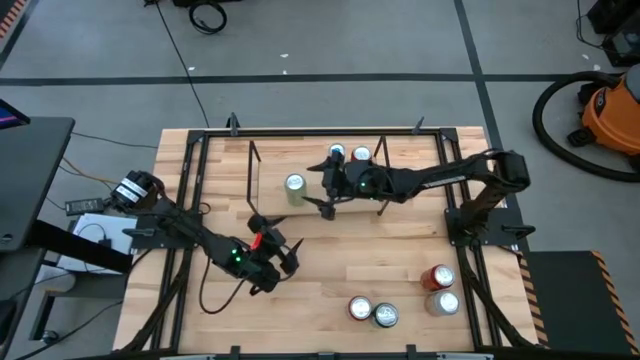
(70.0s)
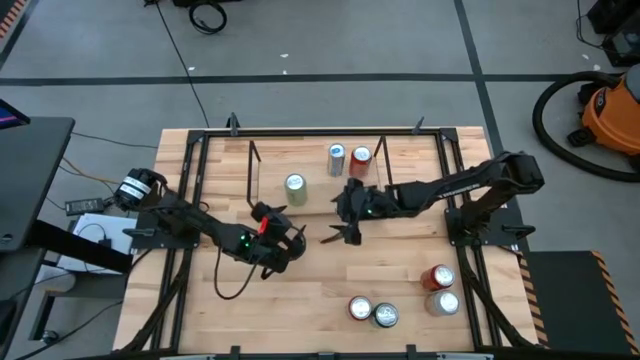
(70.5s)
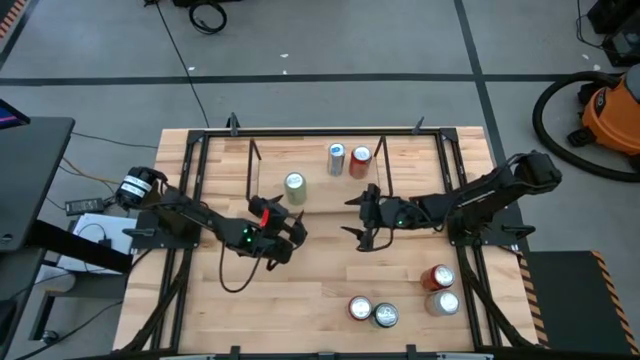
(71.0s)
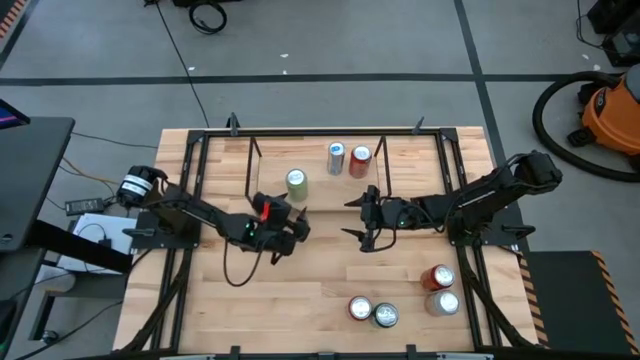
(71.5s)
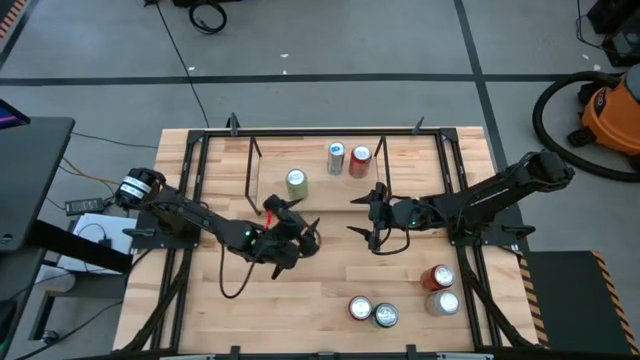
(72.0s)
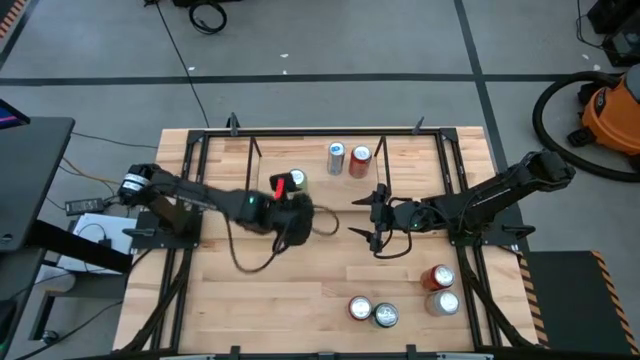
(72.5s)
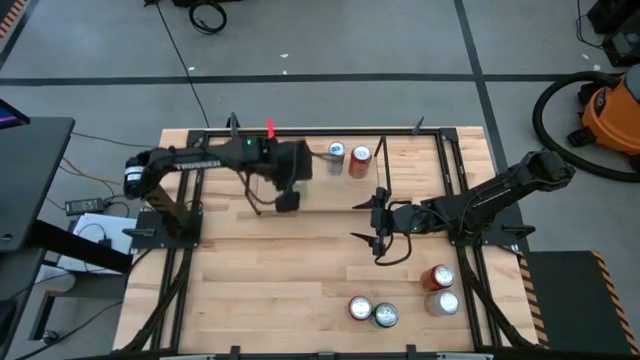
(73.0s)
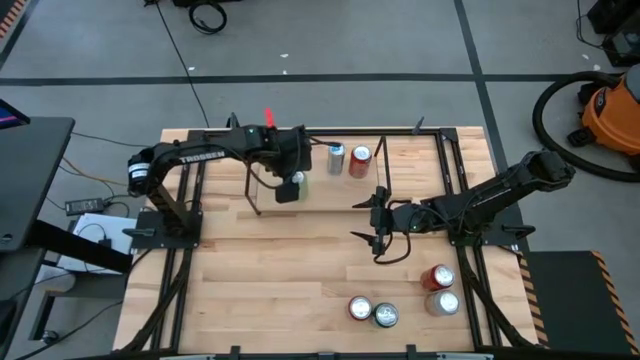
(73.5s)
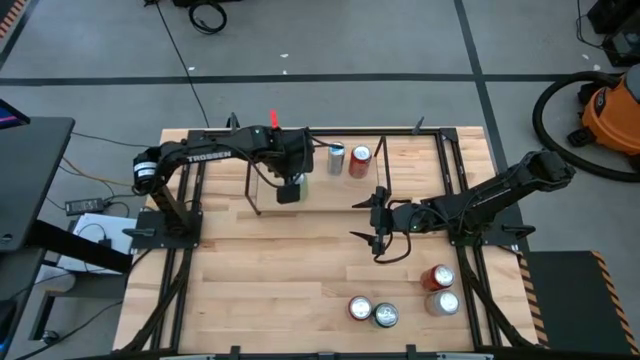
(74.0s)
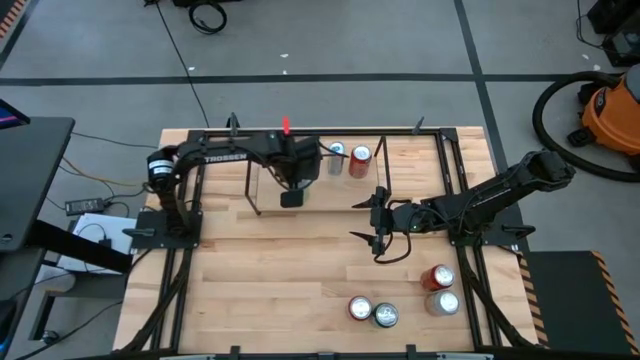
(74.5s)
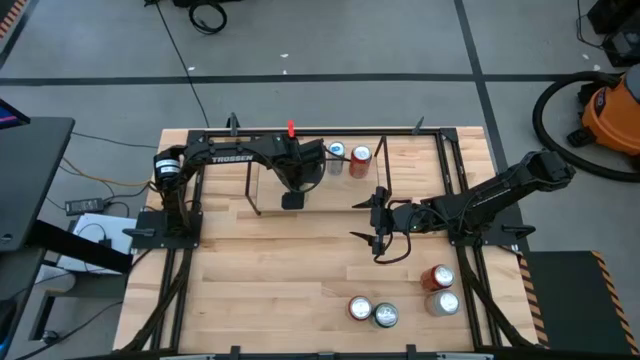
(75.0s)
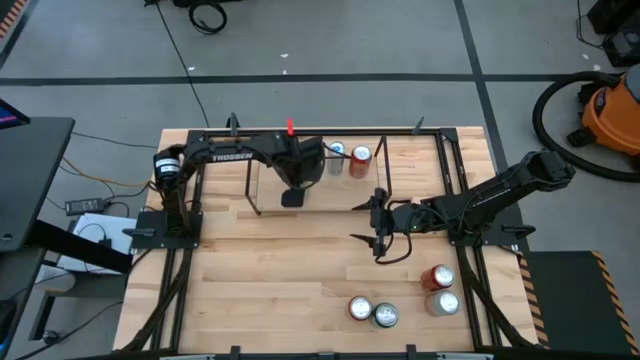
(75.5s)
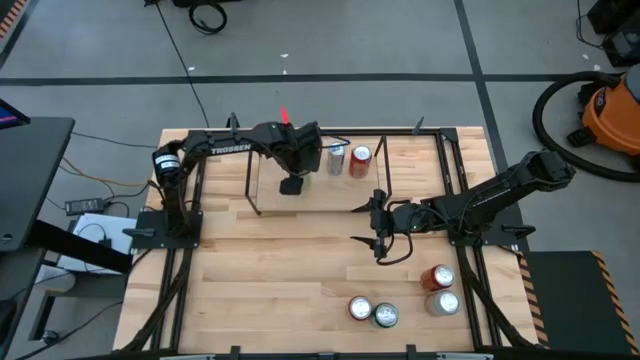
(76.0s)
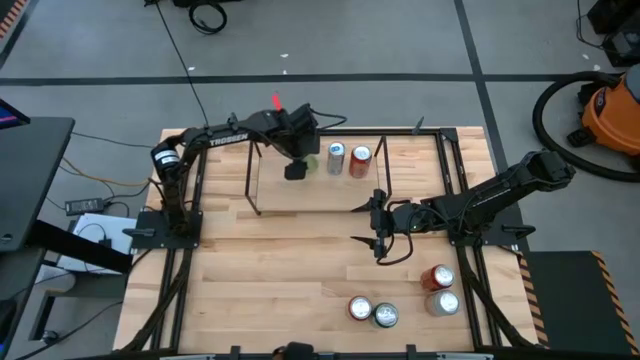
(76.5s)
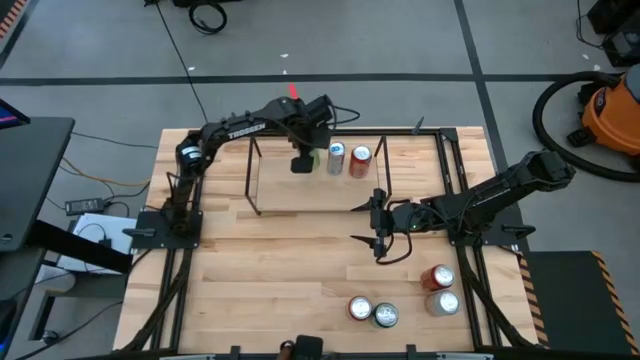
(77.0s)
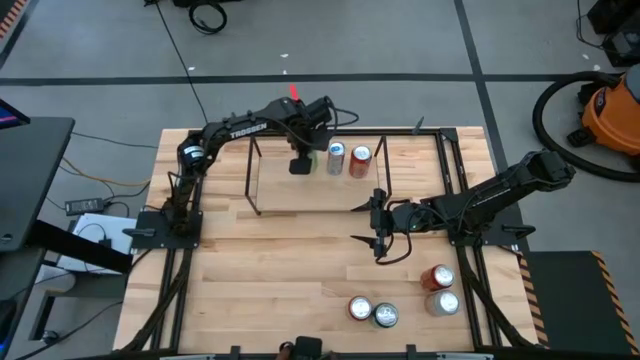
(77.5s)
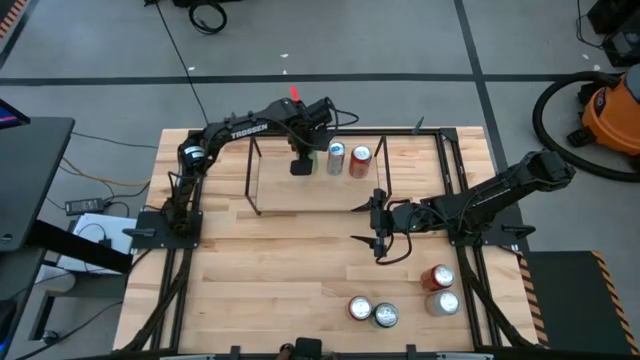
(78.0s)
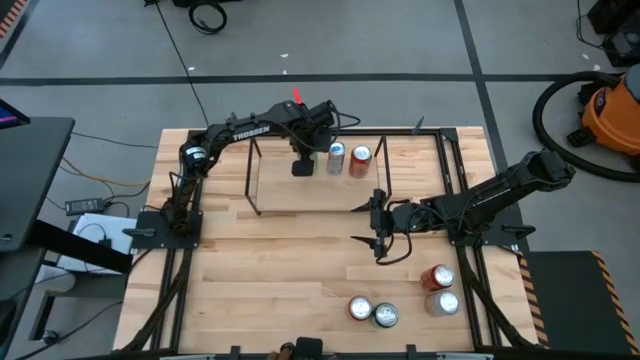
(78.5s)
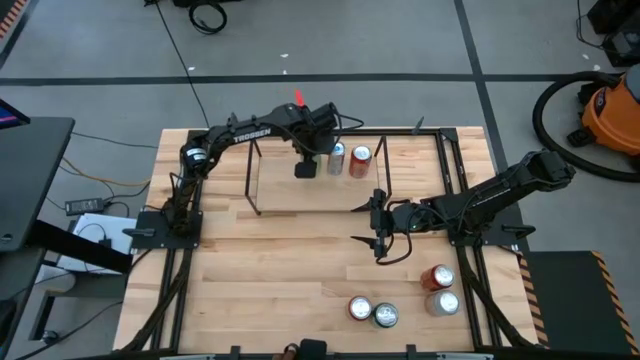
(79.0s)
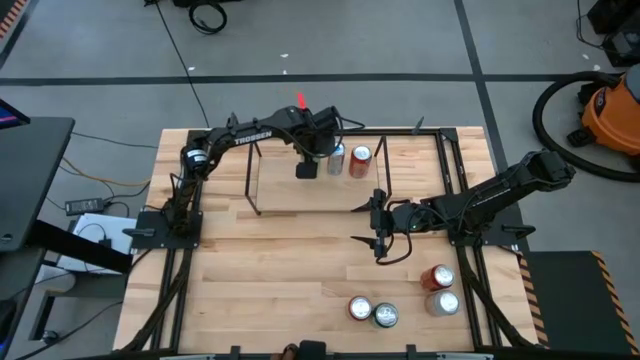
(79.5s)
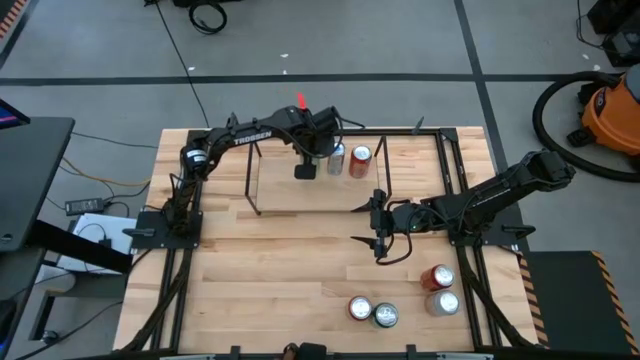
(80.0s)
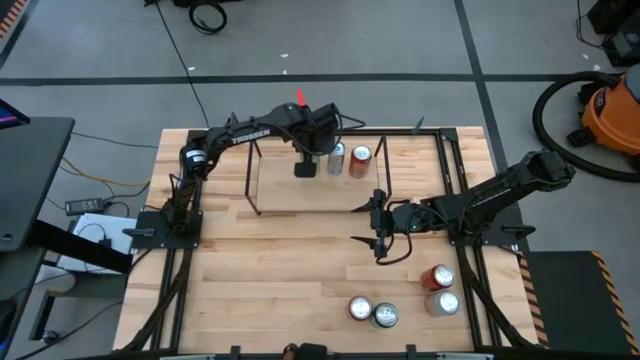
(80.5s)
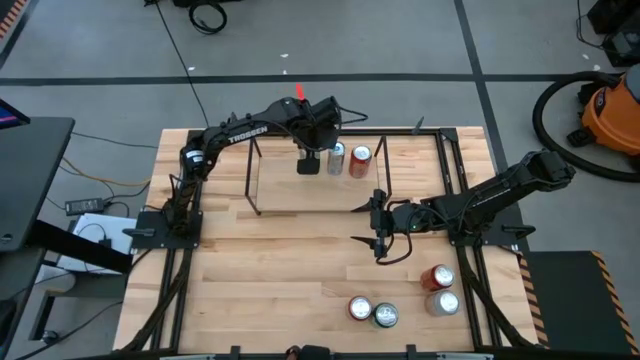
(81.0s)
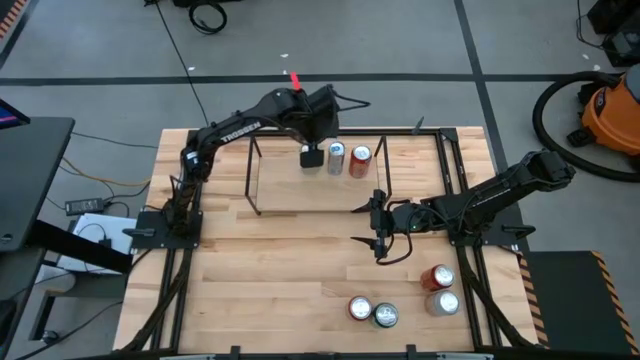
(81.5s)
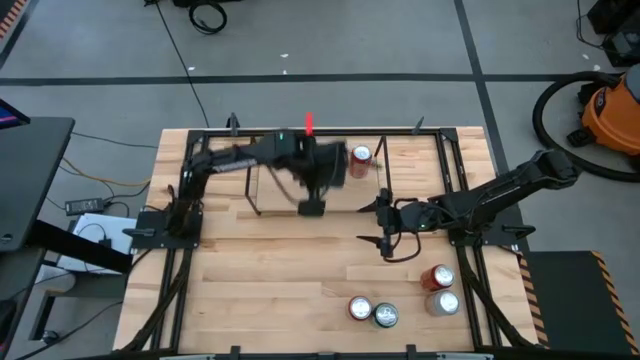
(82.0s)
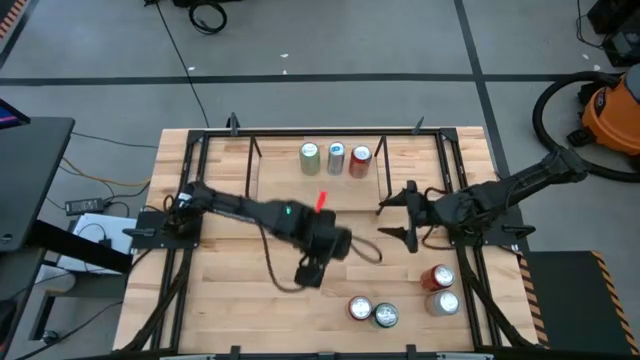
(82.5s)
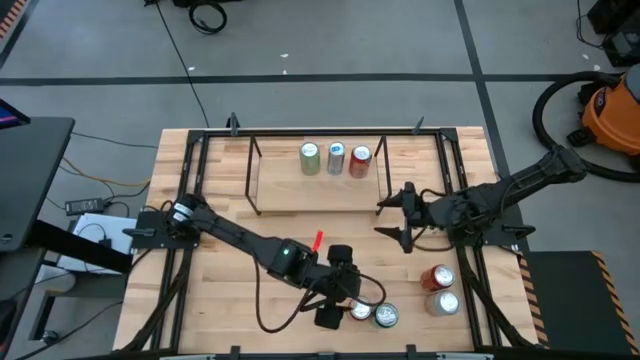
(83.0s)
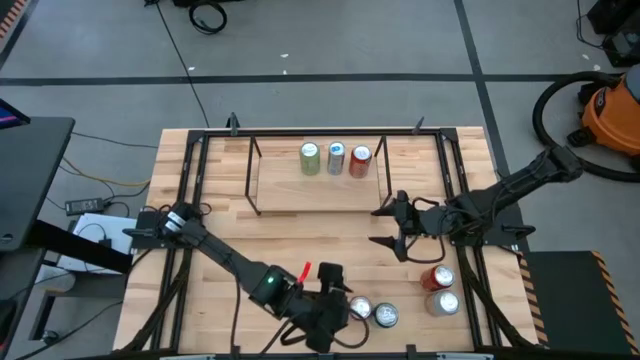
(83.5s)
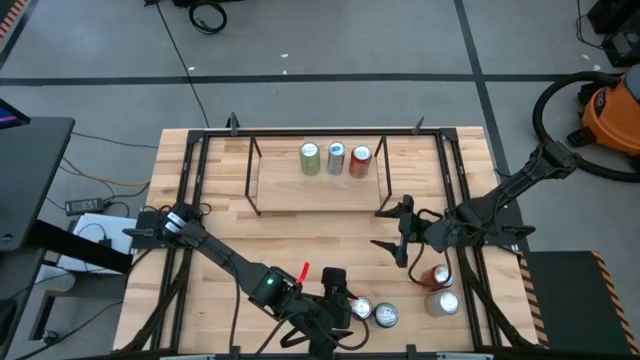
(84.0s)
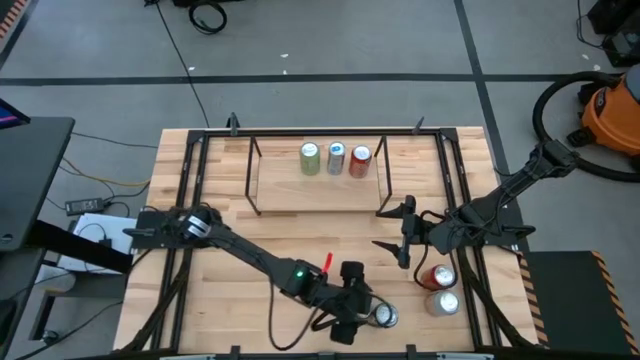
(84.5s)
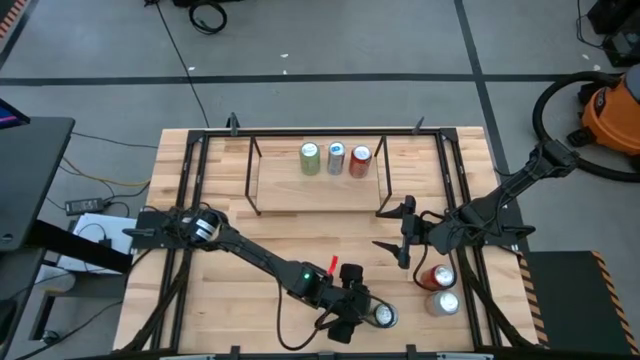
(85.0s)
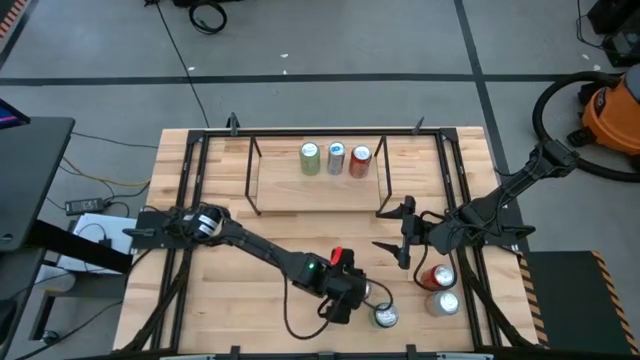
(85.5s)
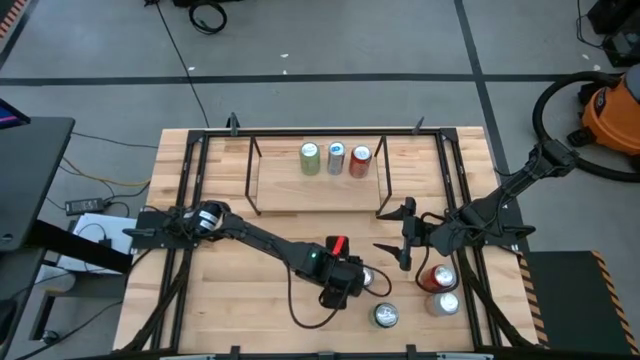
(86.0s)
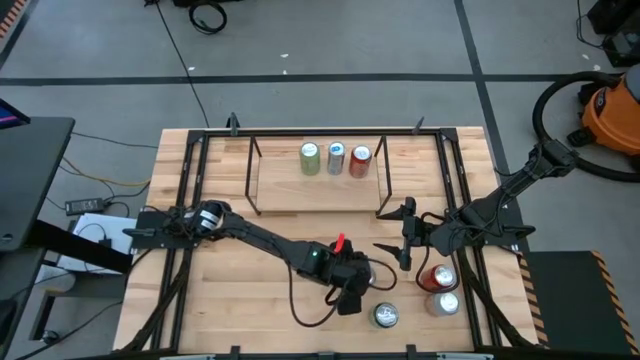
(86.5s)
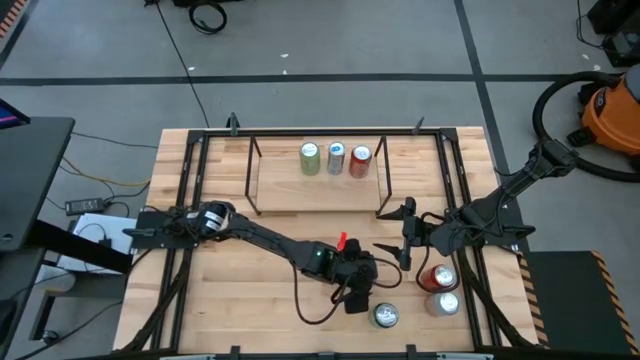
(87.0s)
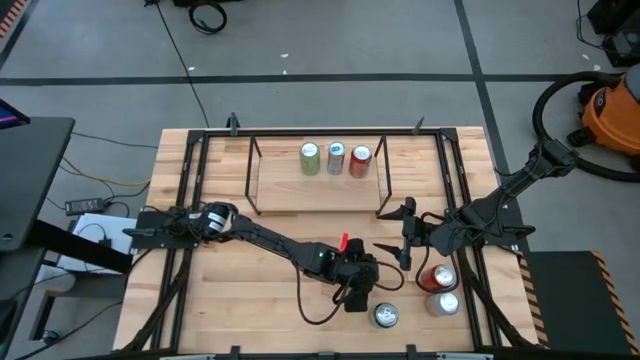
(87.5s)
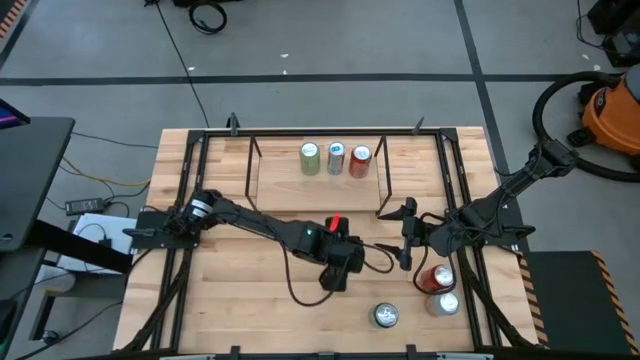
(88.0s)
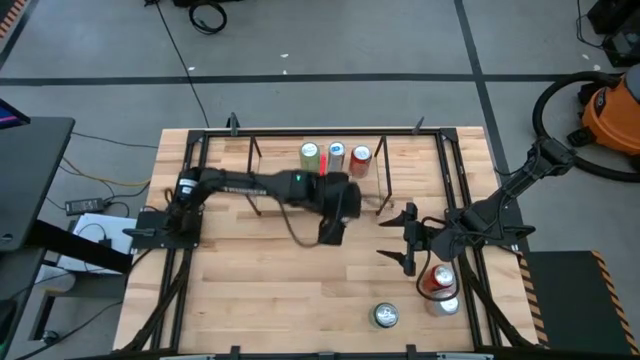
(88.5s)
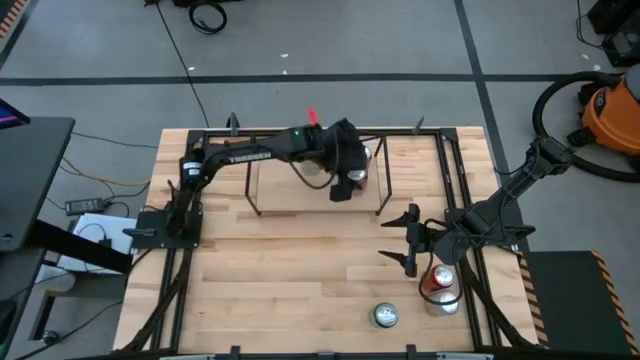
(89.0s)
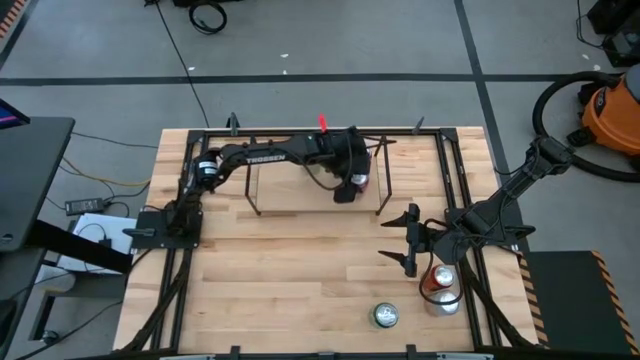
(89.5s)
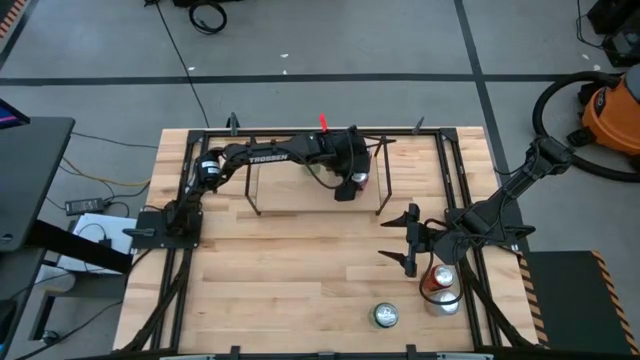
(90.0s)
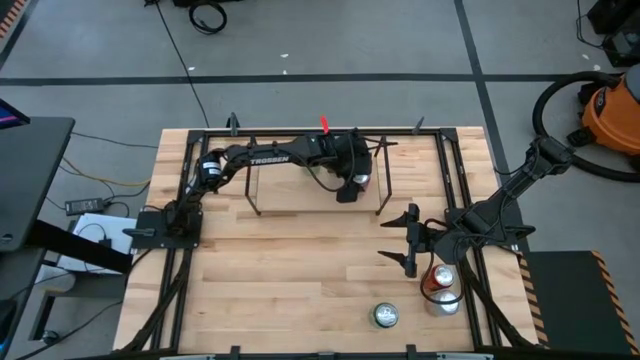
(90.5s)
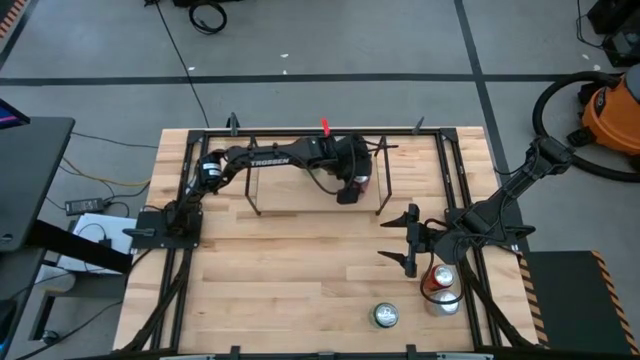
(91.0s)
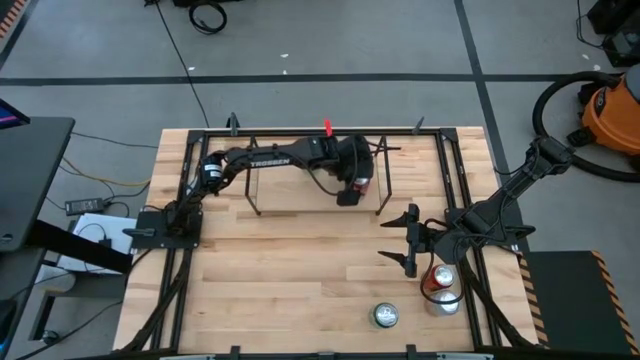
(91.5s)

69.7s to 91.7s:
Task: Place canned beverage on shelf
Put the orange soda can on the
